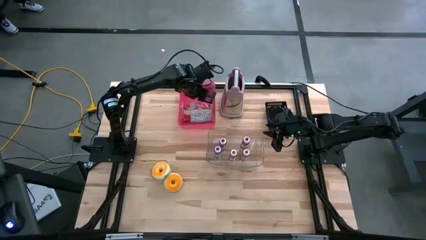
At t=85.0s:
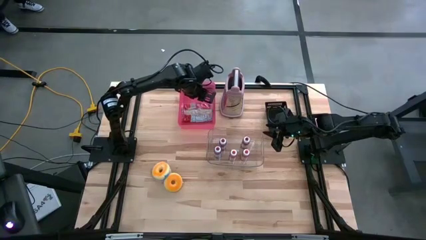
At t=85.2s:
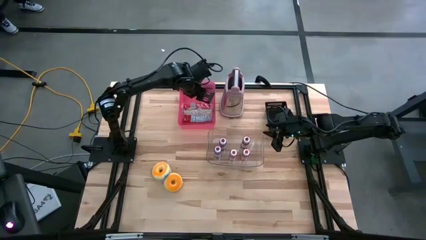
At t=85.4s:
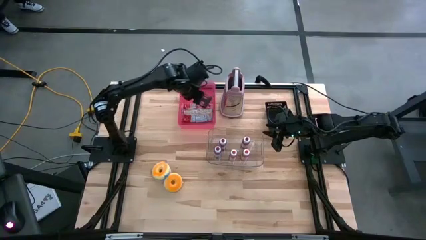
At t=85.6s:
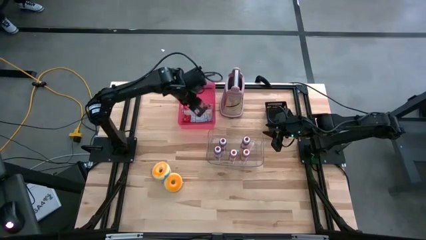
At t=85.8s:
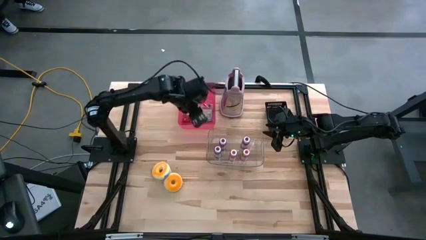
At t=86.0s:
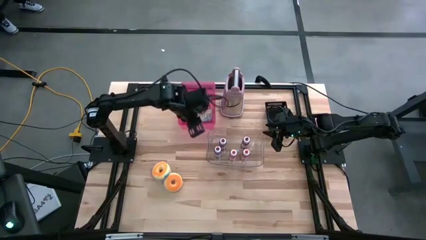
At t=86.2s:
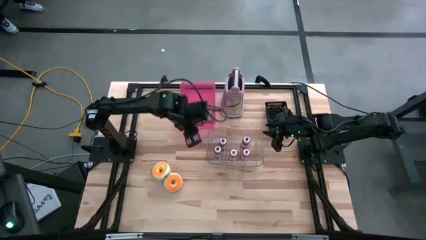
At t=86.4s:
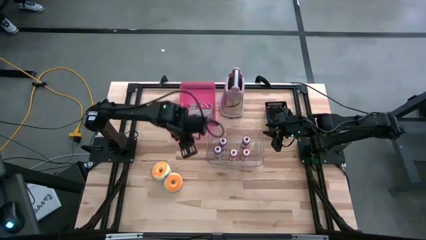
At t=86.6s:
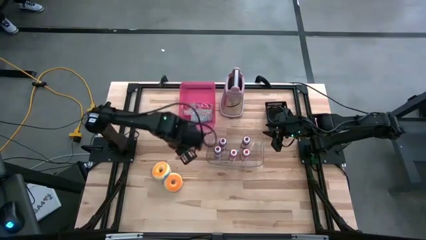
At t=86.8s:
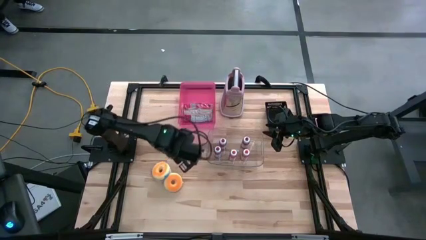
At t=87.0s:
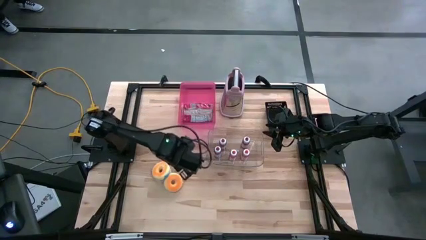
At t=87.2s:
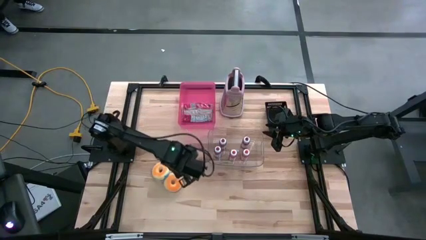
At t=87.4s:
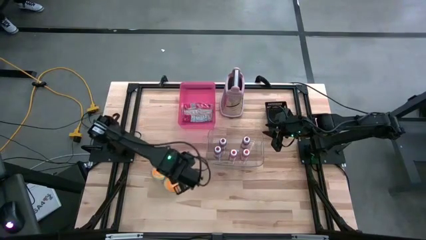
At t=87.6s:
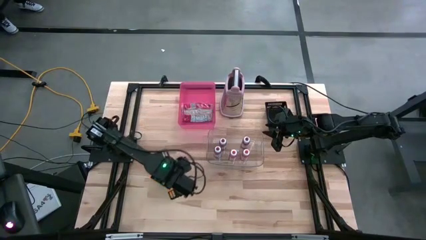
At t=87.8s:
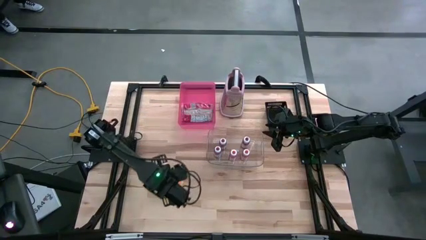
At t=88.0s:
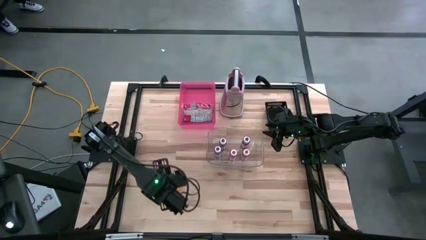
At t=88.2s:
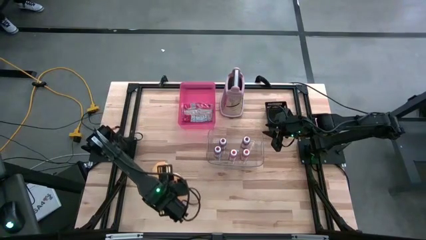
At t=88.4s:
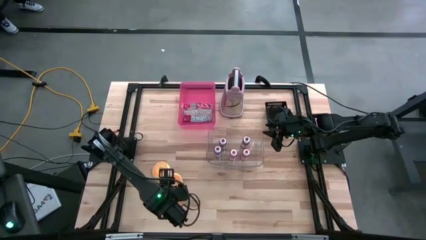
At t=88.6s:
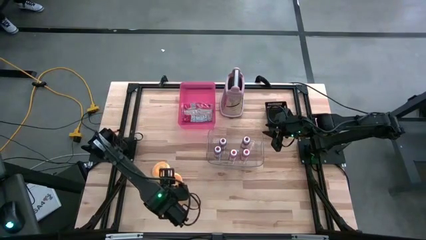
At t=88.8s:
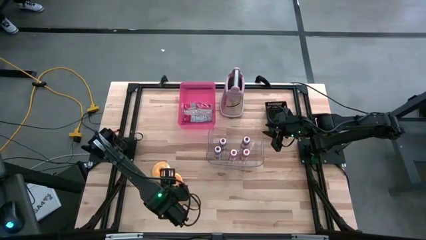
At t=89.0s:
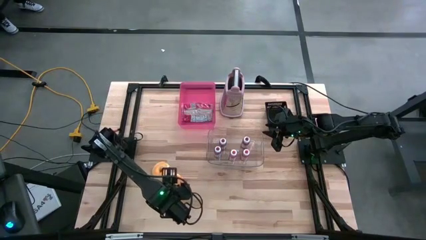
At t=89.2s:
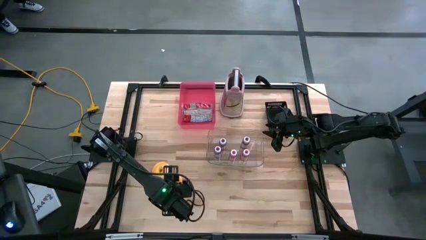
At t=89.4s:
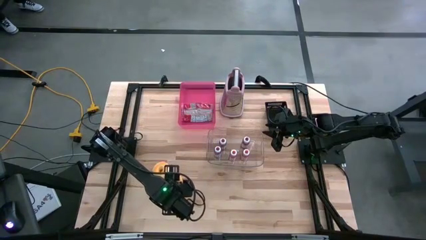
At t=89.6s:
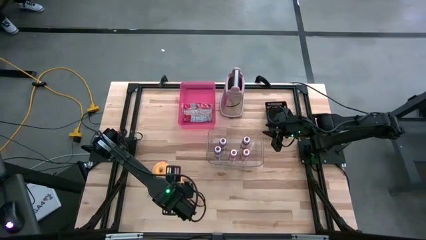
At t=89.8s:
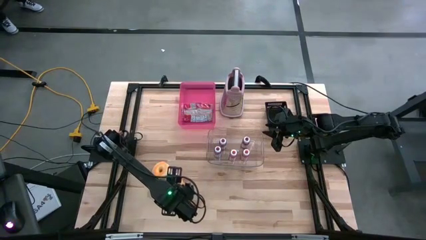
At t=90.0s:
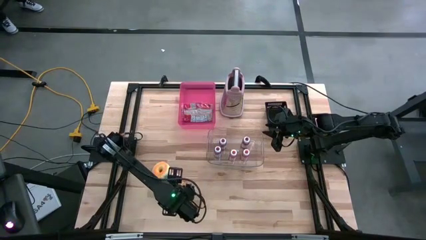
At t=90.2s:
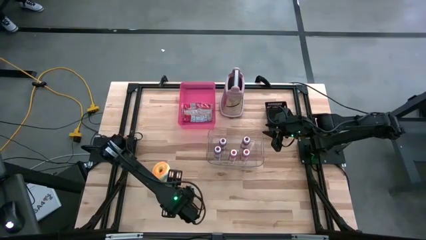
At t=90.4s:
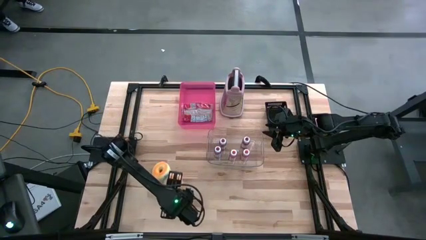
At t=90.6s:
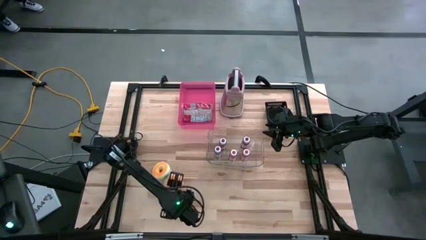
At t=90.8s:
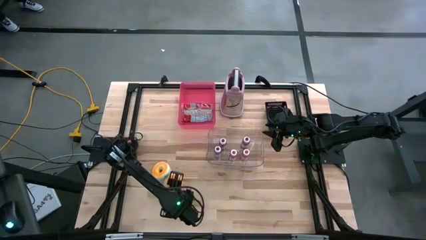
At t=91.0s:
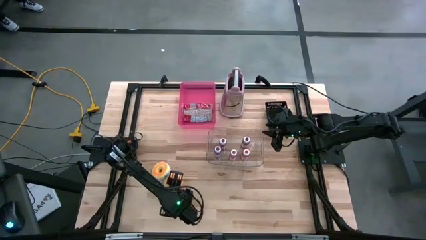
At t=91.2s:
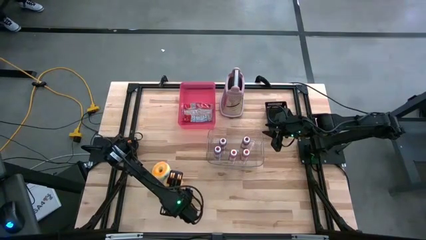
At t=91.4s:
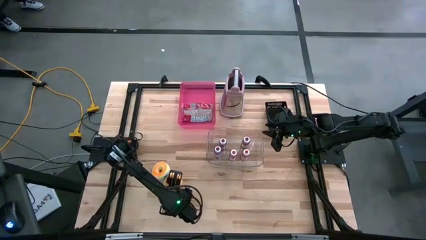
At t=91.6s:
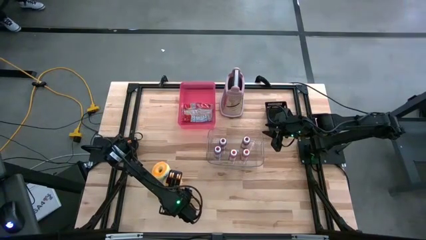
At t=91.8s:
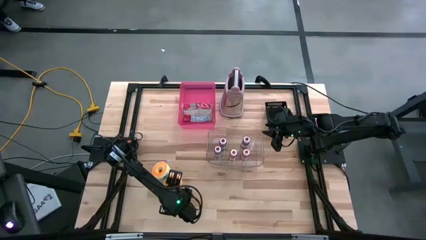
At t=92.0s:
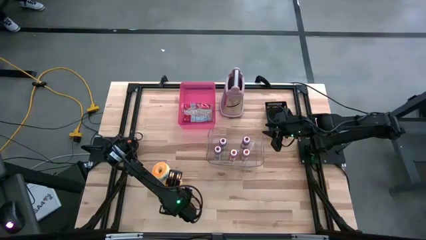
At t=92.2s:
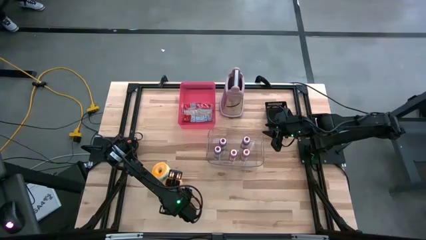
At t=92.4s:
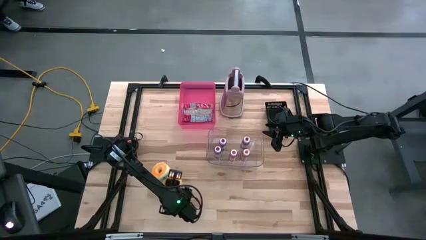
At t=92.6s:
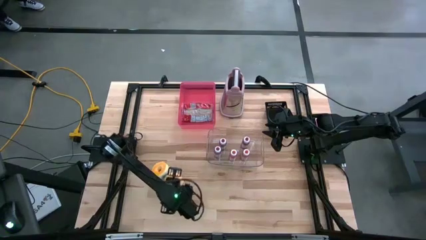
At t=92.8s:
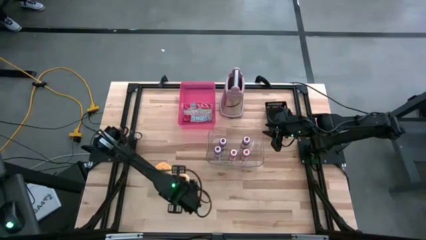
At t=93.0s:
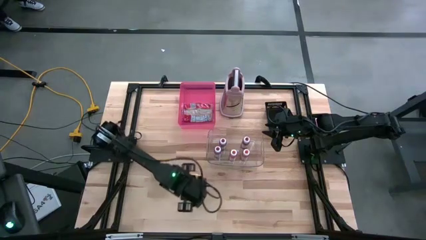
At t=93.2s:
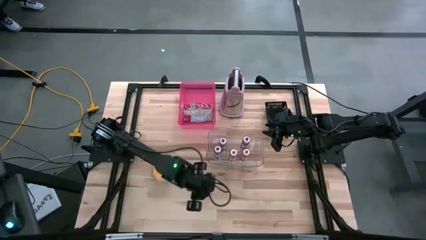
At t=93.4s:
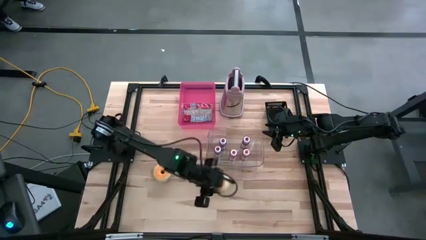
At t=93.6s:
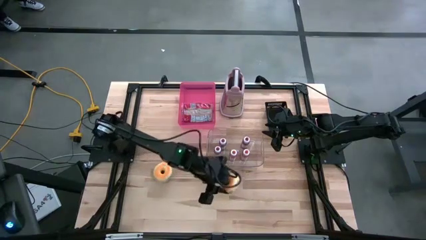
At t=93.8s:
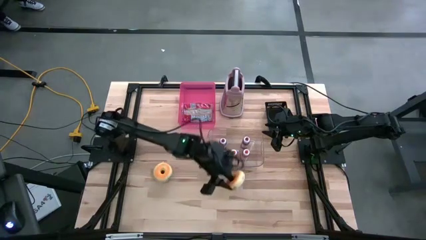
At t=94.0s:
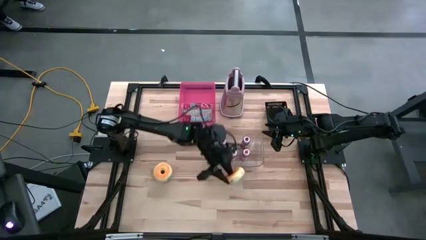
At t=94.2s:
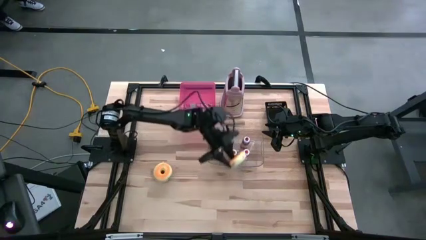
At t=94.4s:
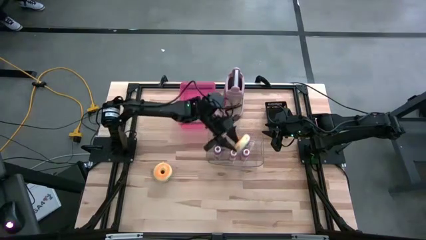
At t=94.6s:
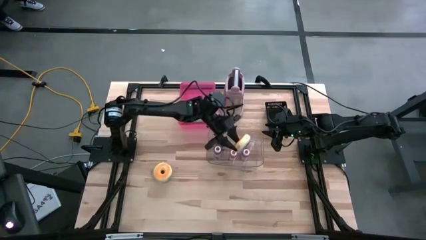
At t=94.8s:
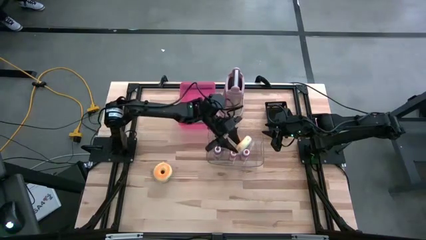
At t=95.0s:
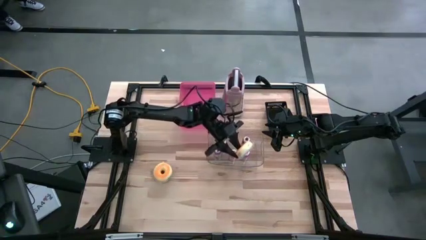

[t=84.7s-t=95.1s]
Put the bottom blue donut into the black bin
